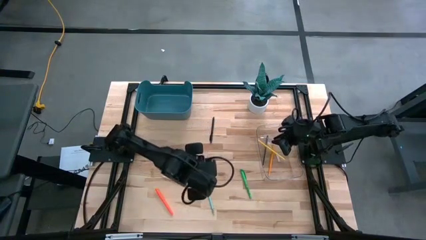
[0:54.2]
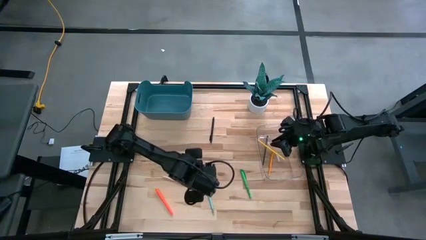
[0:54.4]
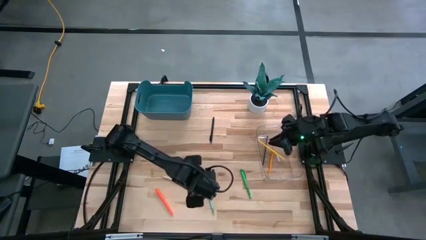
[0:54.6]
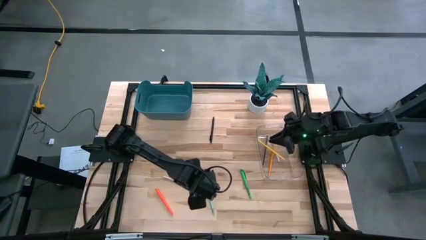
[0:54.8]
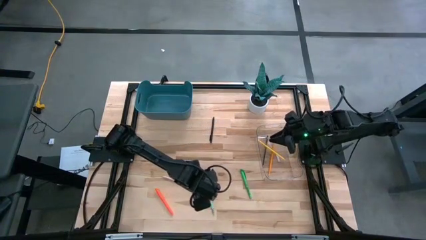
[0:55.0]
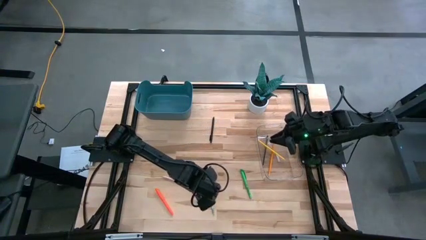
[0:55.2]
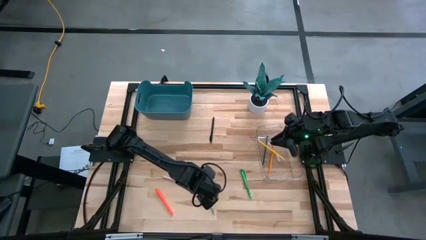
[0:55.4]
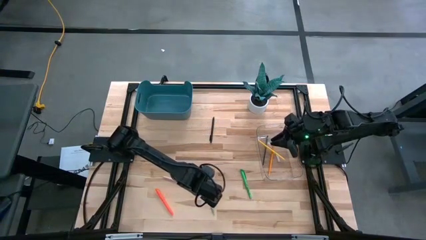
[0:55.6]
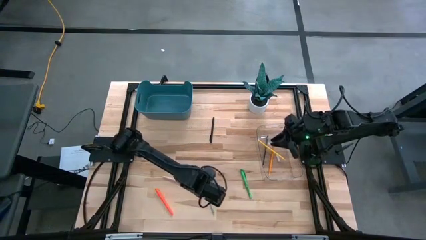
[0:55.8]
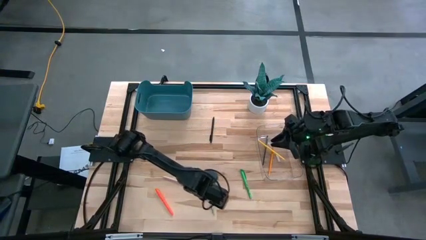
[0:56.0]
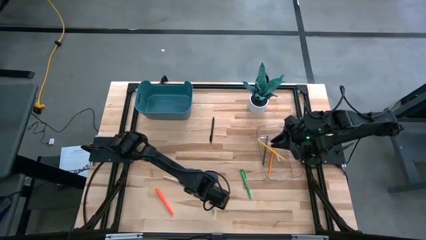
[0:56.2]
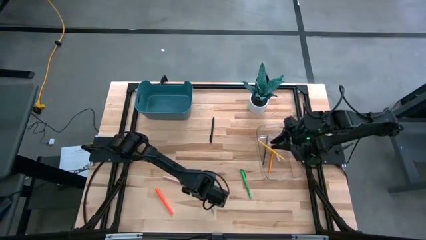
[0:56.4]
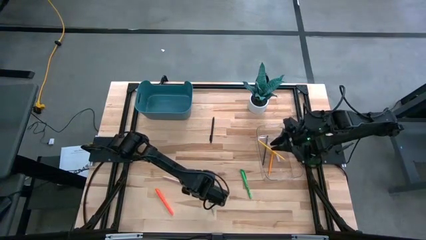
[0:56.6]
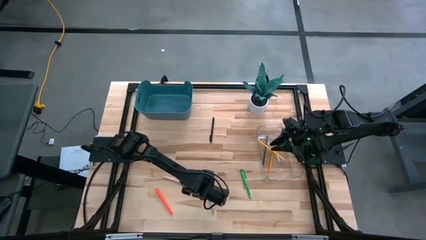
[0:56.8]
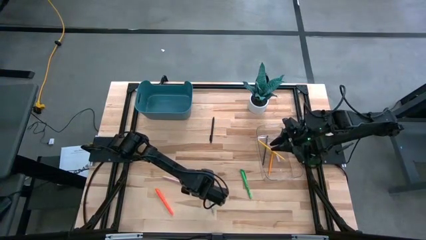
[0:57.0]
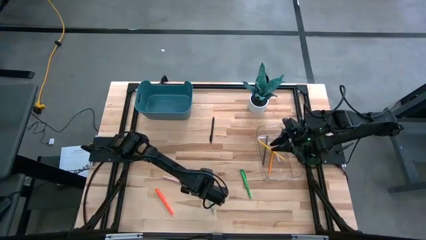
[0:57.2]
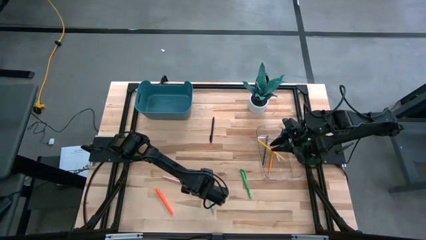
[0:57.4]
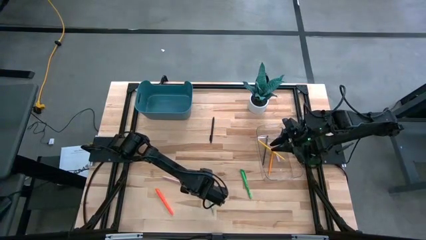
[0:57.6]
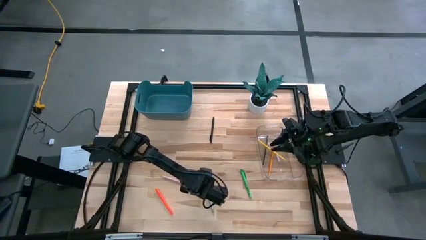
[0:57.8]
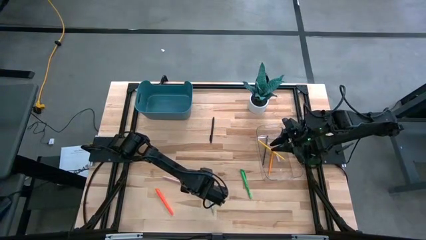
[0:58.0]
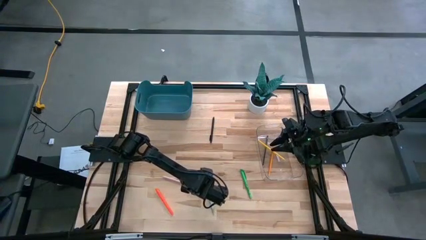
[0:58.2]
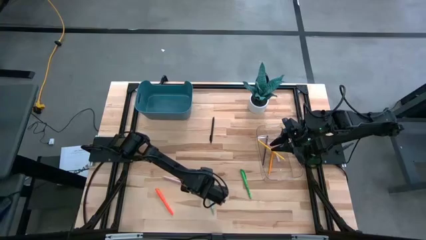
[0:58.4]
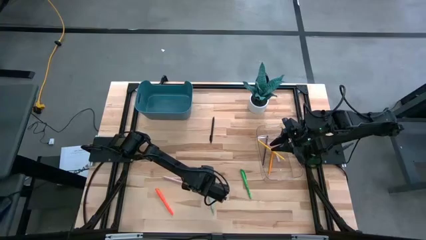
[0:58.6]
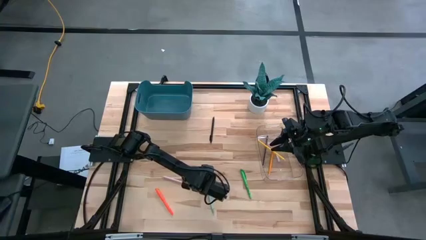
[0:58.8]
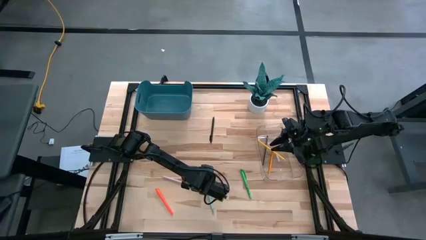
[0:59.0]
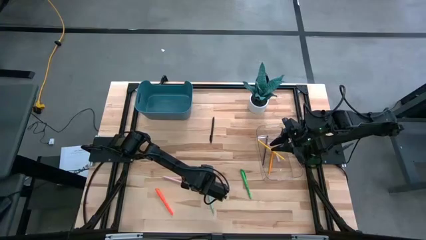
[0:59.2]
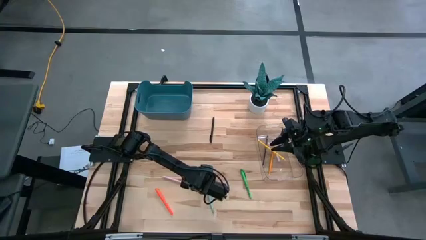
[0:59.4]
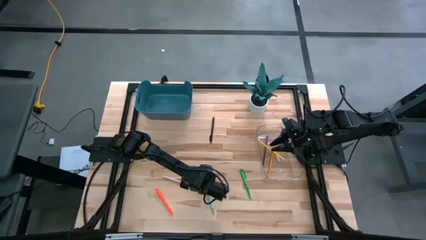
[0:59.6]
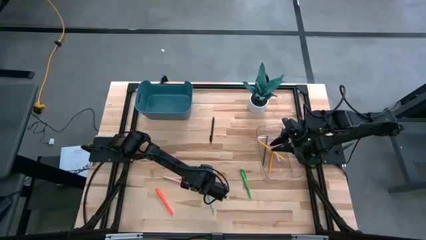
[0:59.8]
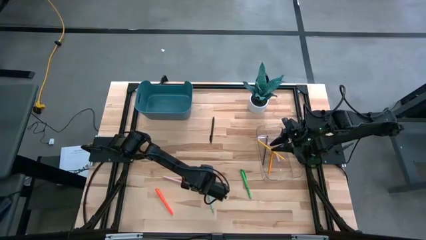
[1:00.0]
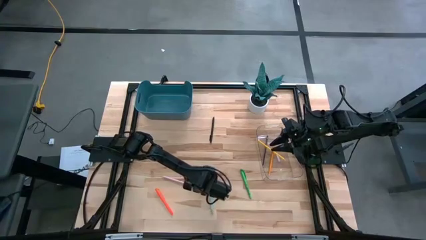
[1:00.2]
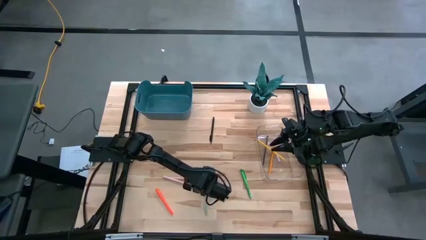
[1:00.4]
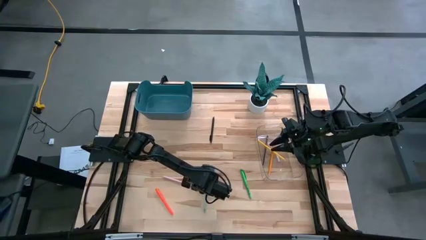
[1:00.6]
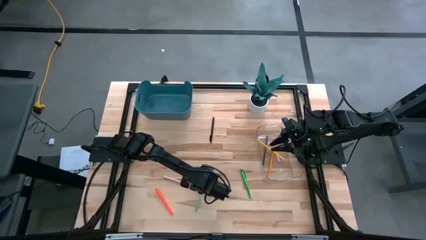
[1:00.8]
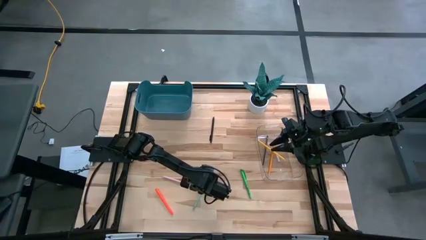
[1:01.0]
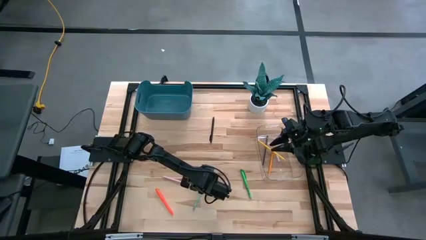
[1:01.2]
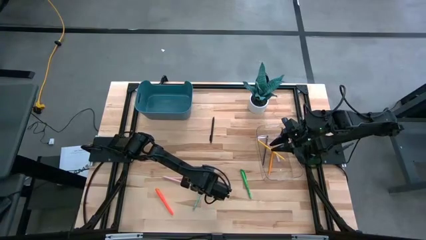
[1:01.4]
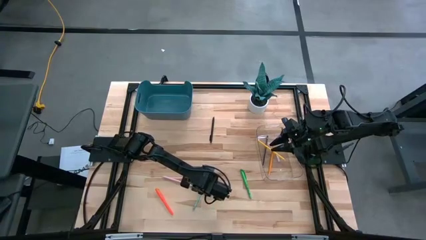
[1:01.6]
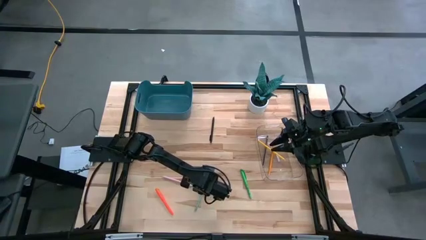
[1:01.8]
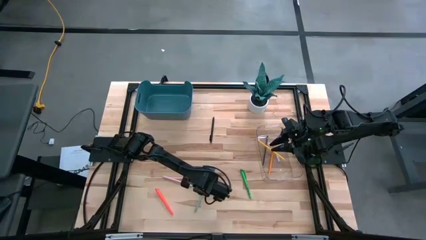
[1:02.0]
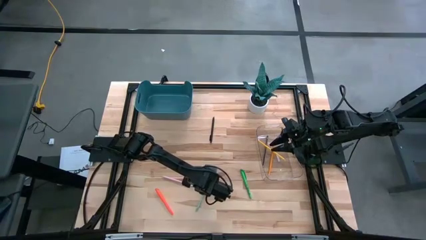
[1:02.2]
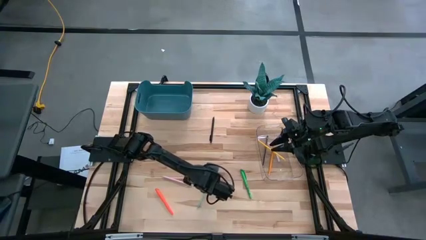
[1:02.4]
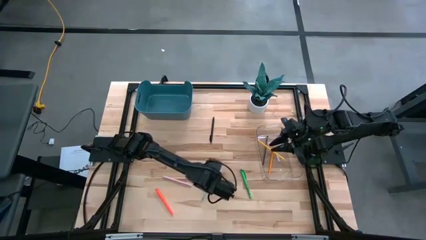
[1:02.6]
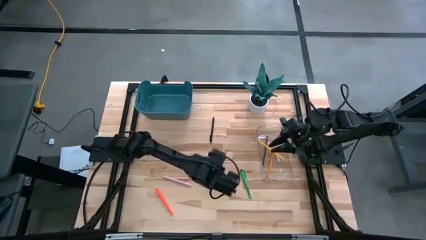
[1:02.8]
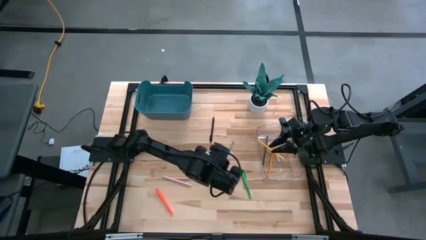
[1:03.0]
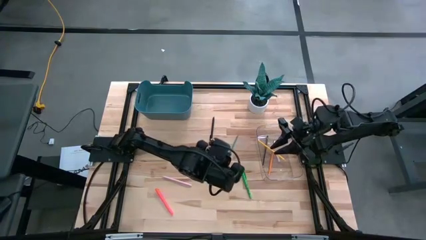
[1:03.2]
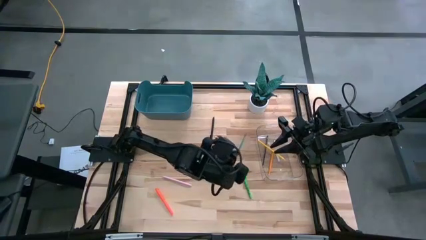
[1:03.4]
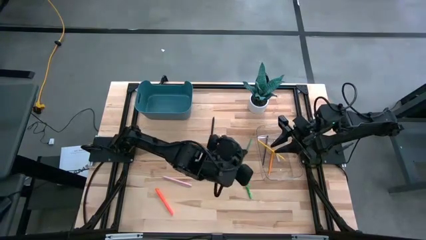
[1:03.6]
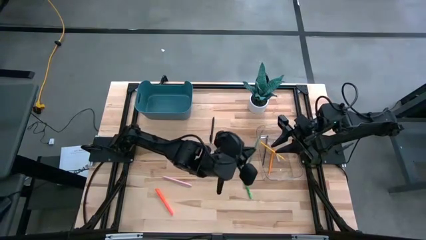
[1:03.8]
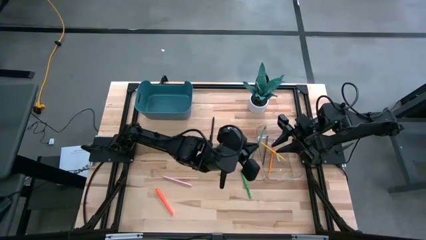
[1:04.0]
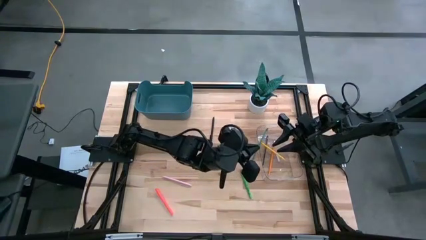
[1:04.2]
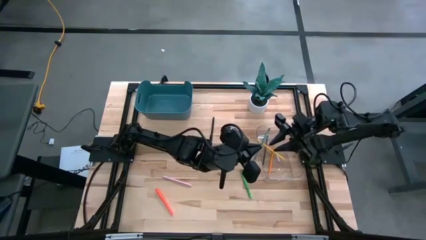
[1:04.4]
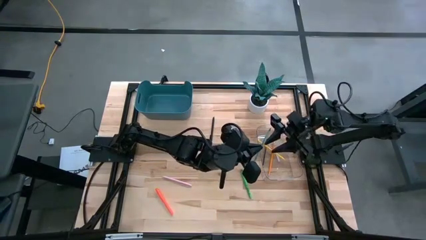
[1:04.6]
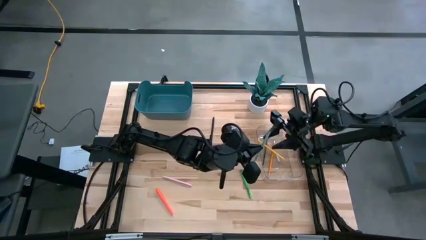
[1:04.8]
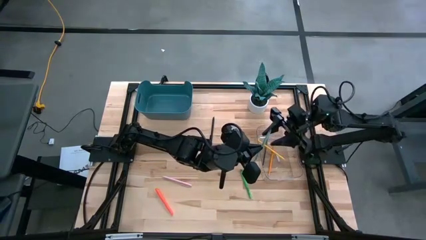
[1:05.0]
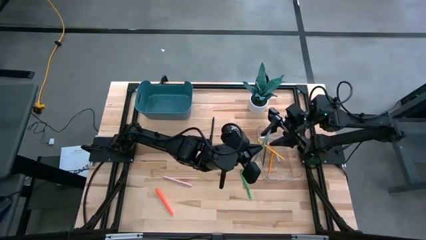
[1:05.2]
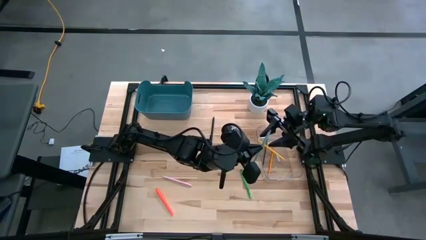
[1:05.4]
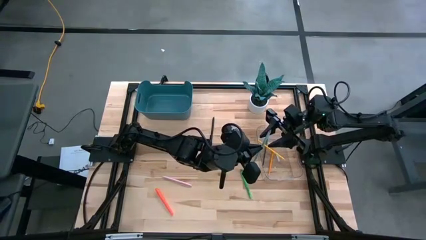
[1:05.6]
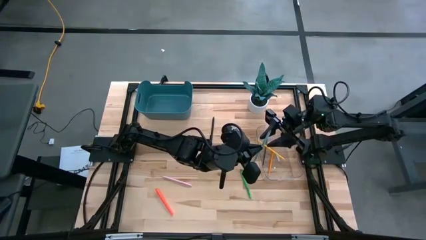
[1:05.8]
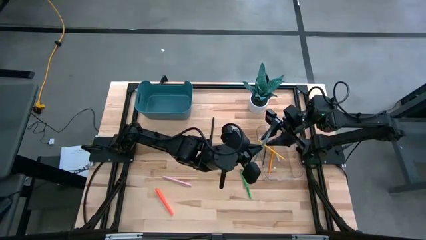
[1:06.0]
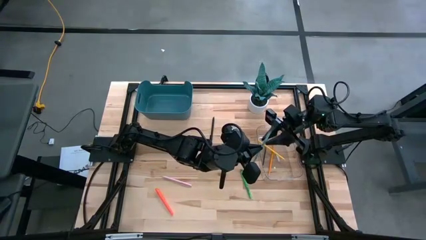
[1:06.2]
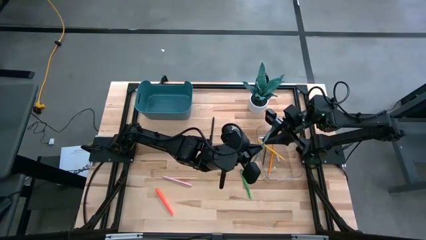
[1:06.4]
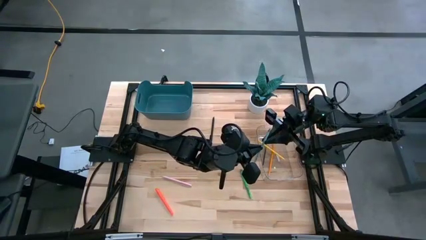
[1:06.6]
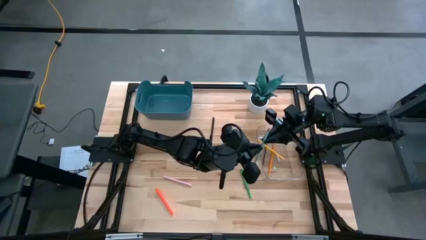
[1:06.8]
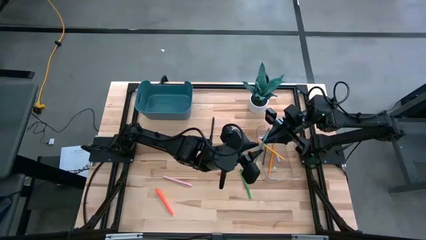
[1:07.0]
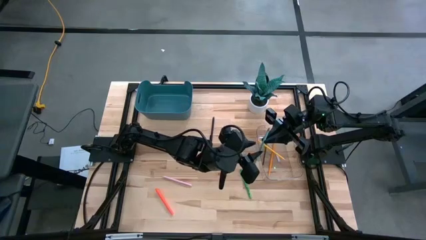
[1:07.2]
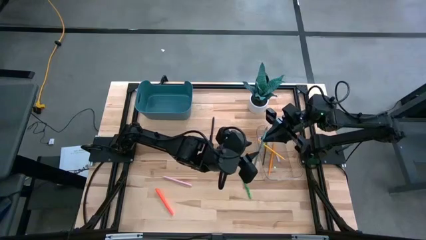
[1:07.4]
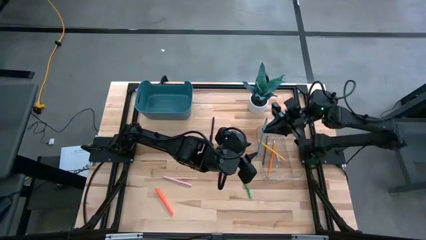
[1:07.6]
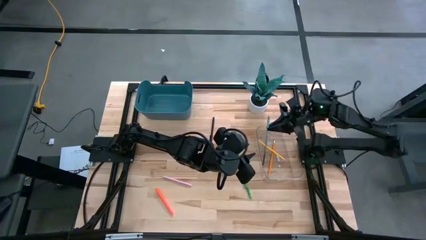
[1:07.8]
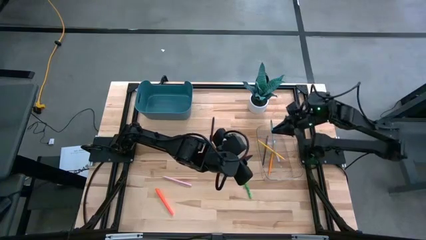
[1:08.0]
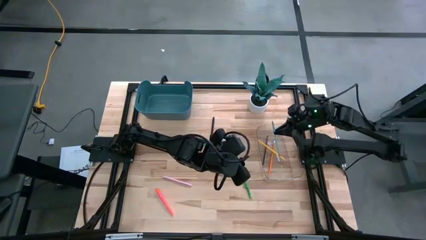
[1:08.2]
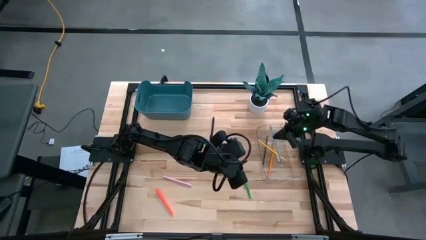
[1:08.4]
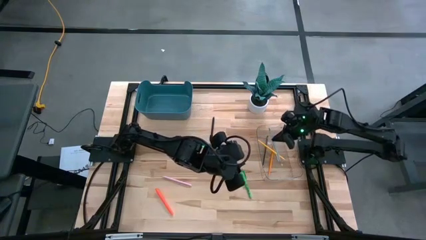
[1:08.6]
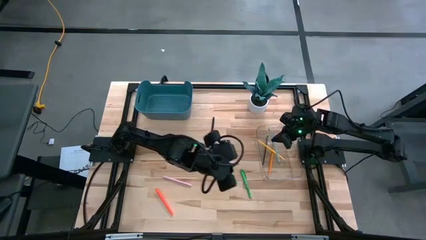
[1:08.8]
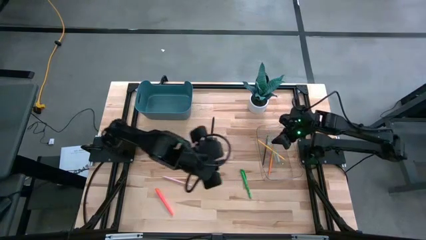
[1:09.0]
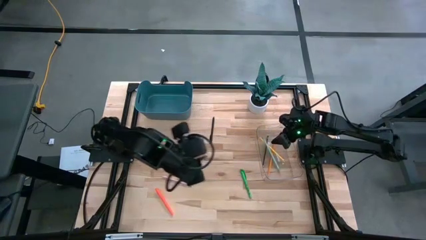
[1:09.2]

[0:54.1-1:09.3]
Task: Sort pens & pencils
Put the light blue pencil into the transparent bin

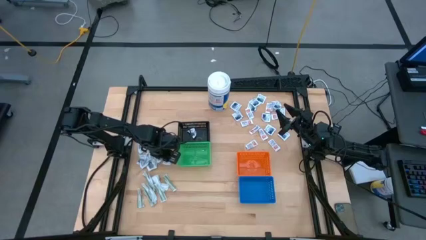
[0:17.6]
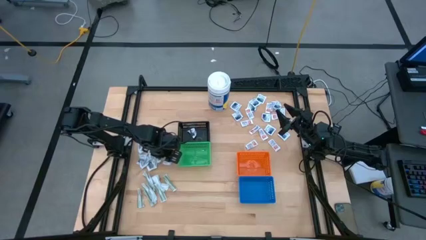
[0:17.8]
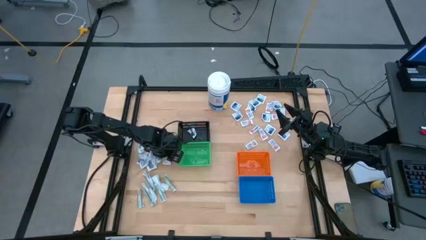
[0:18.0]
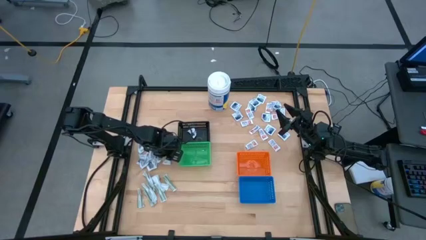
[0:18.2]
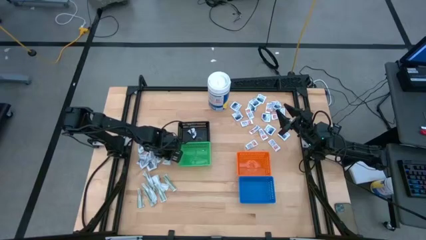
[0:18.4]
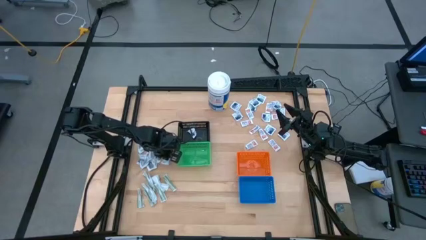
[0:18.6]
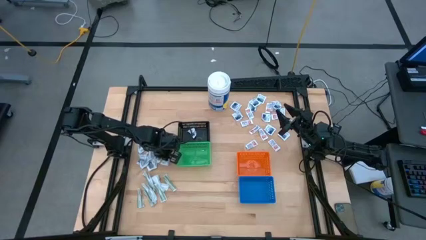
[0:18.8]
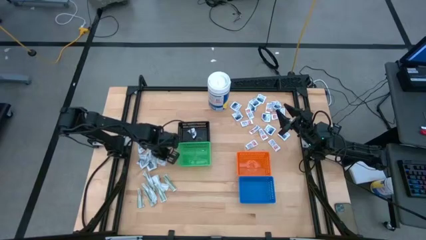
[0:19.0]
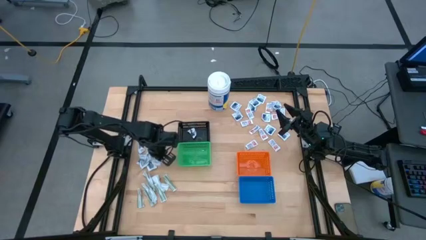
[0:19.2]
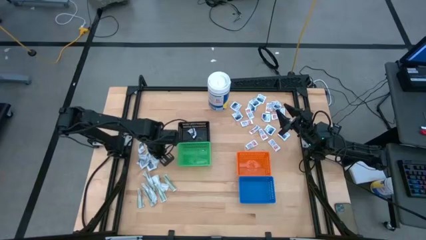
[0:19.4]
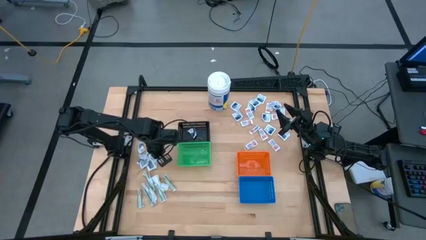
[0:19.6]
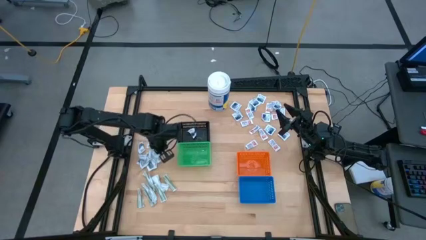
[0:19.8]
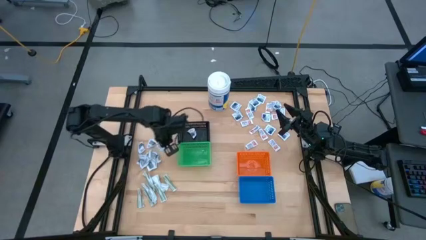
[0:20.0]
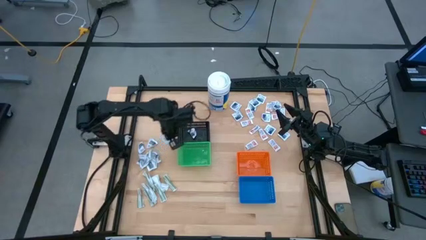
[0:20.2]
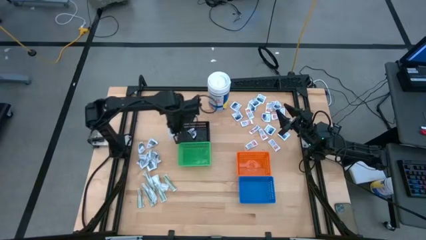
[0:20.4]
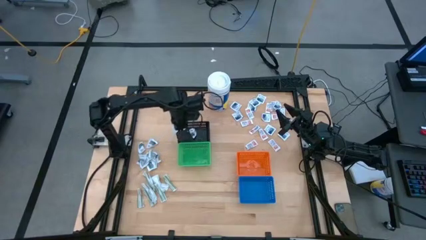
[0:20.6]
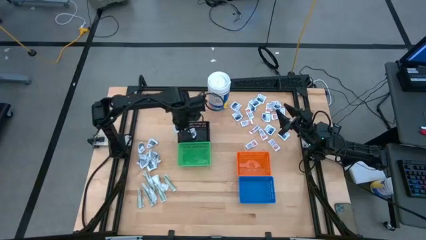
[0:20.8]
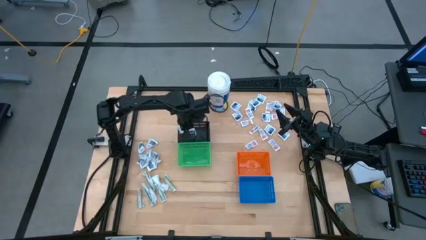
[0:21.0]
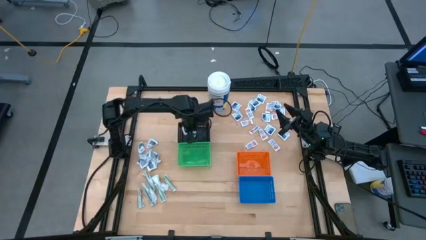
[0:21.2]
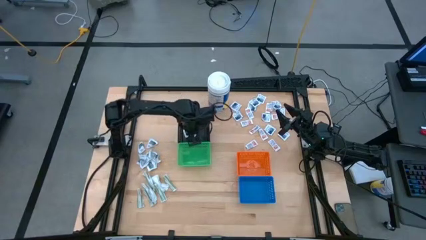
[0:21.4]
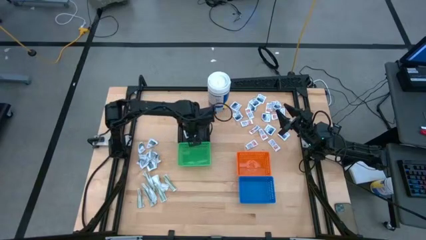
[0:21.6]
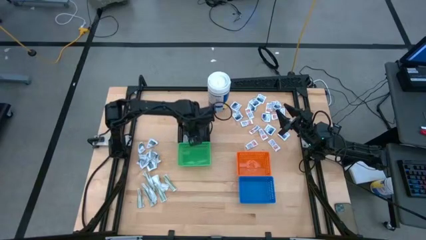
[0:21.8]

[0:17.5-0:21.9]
Task: Pick & Place First Aid Supplies
Put the black pad into the black bin
